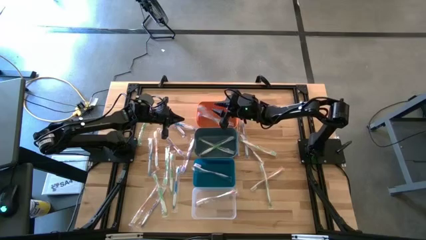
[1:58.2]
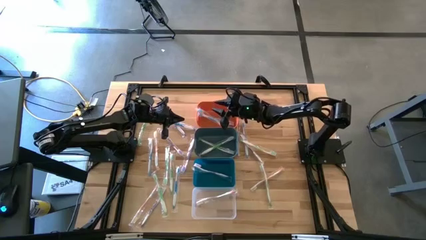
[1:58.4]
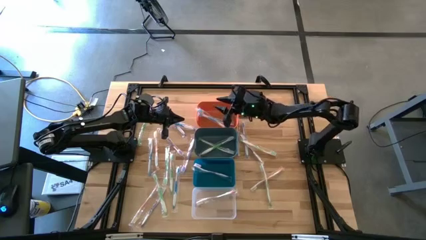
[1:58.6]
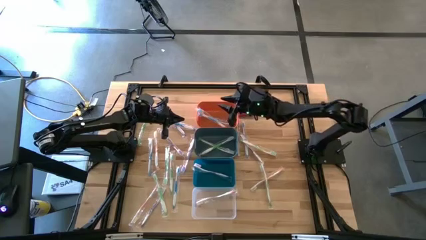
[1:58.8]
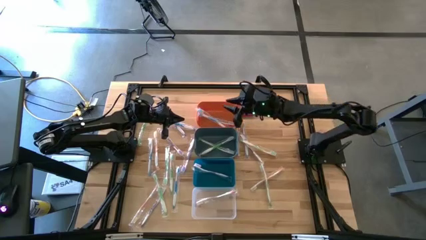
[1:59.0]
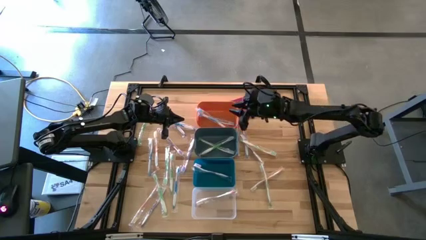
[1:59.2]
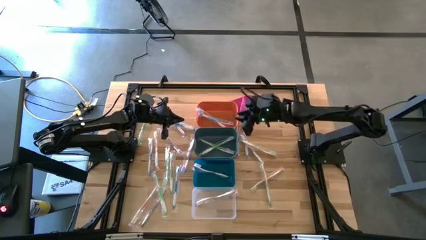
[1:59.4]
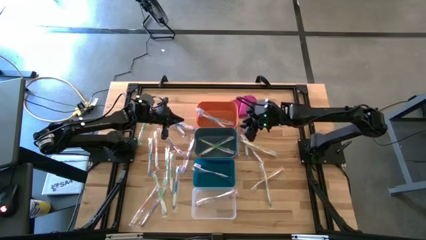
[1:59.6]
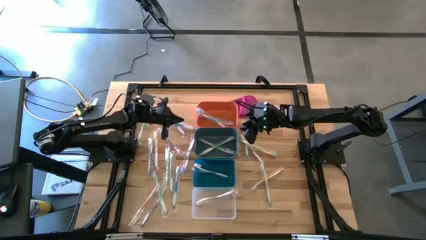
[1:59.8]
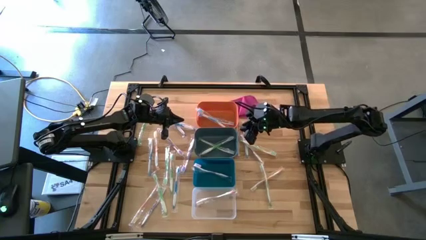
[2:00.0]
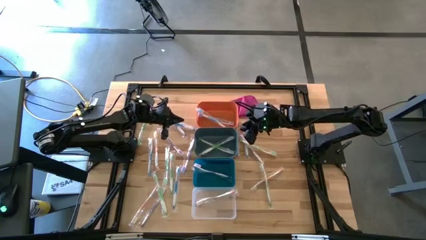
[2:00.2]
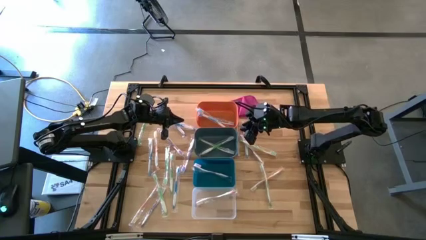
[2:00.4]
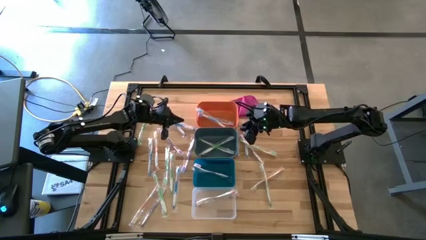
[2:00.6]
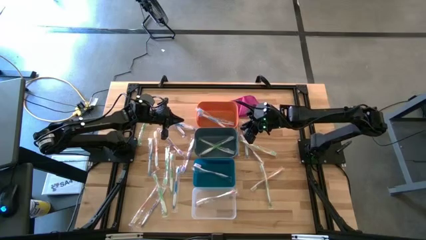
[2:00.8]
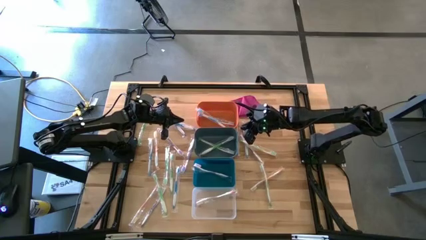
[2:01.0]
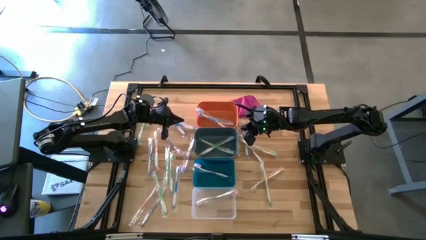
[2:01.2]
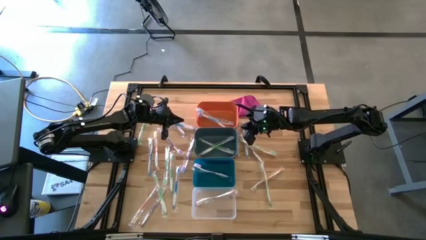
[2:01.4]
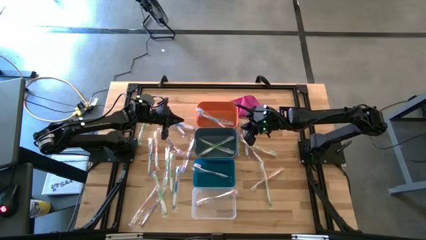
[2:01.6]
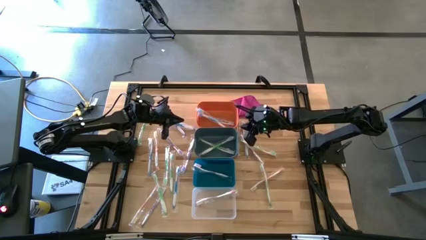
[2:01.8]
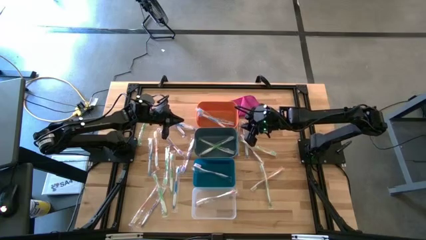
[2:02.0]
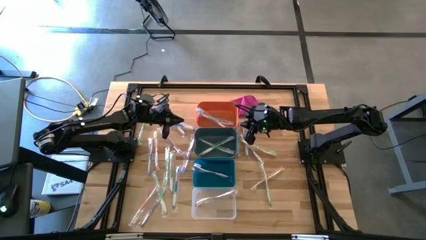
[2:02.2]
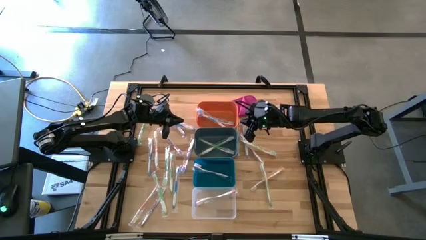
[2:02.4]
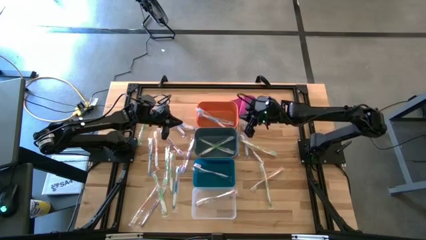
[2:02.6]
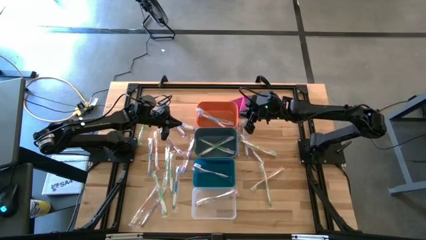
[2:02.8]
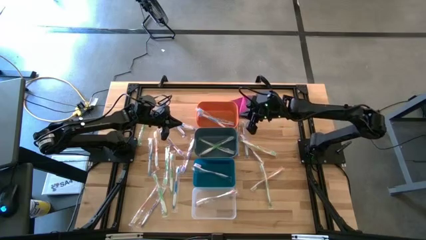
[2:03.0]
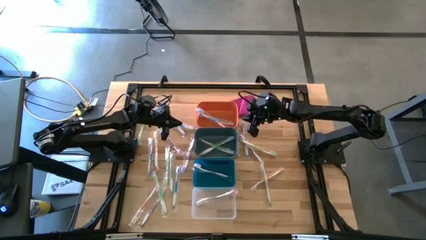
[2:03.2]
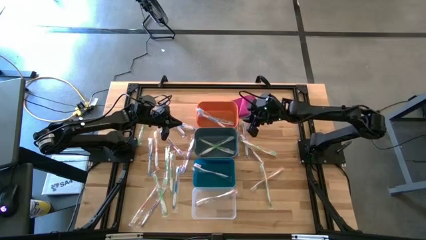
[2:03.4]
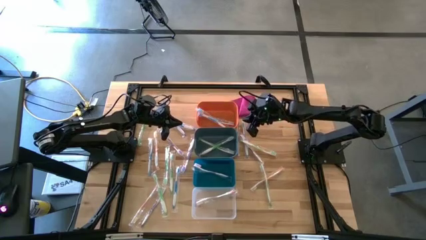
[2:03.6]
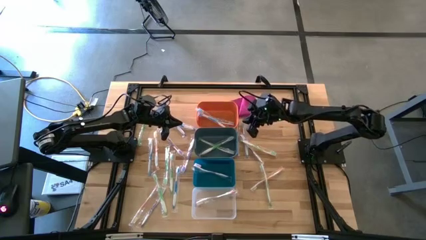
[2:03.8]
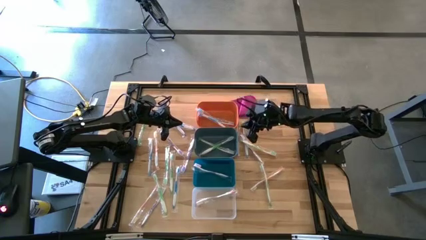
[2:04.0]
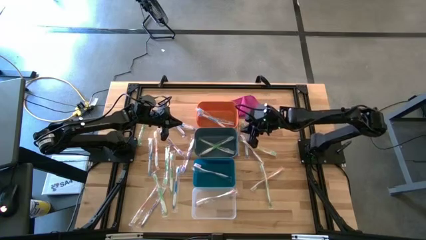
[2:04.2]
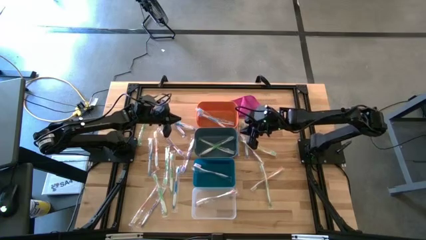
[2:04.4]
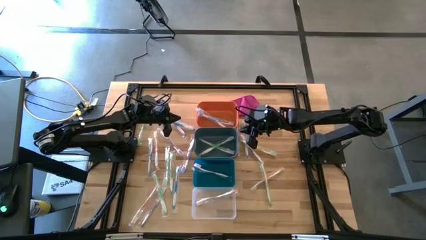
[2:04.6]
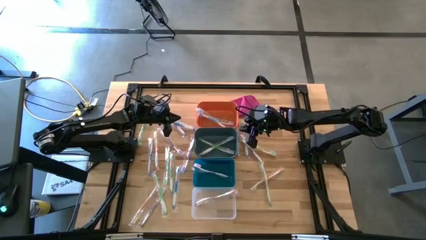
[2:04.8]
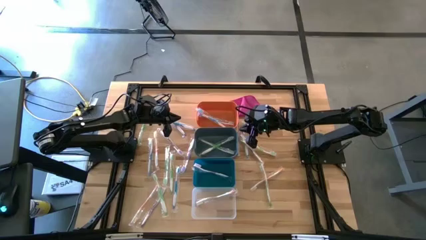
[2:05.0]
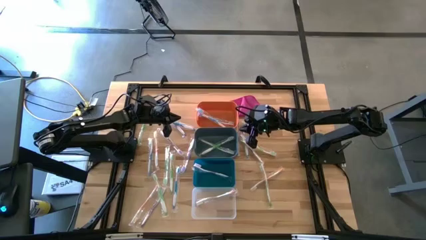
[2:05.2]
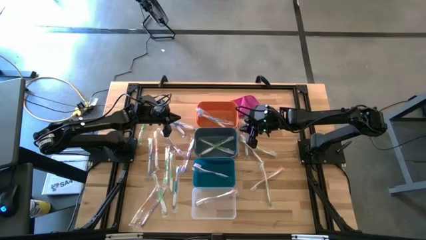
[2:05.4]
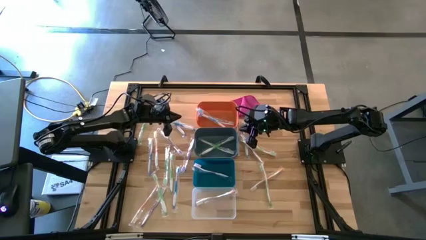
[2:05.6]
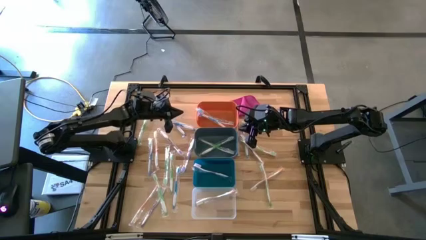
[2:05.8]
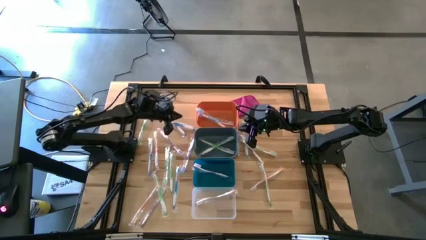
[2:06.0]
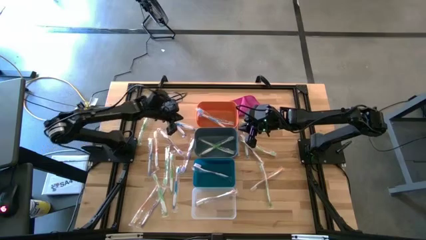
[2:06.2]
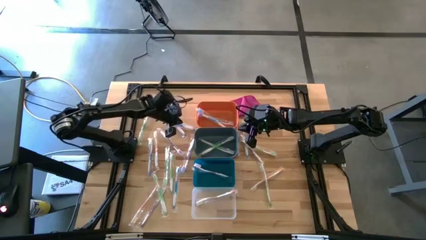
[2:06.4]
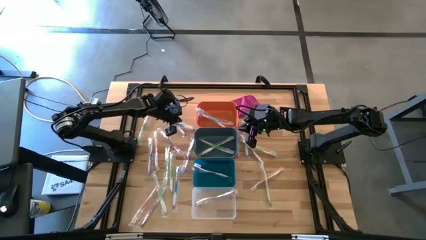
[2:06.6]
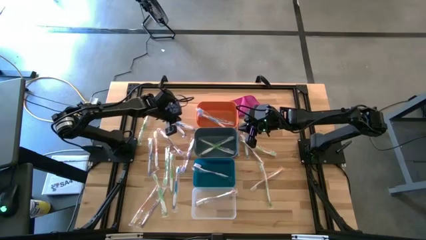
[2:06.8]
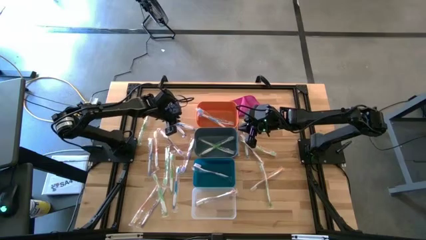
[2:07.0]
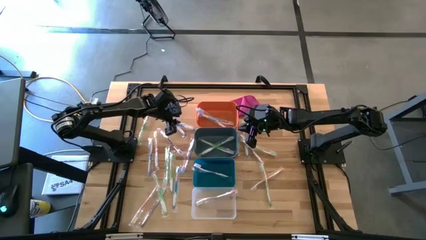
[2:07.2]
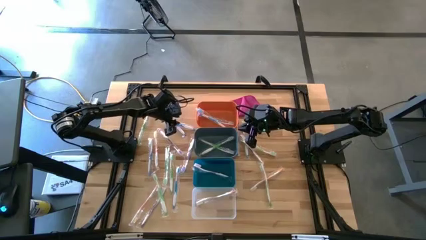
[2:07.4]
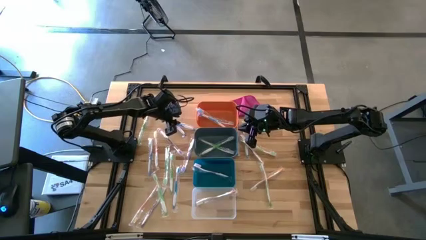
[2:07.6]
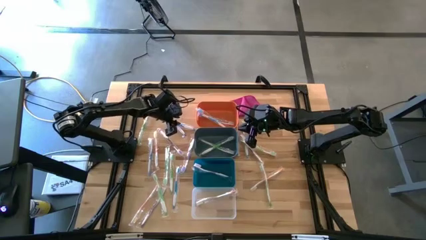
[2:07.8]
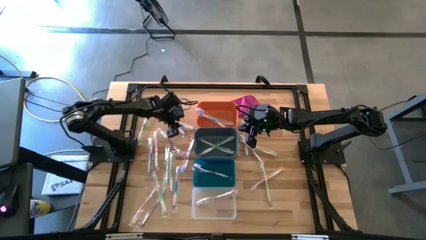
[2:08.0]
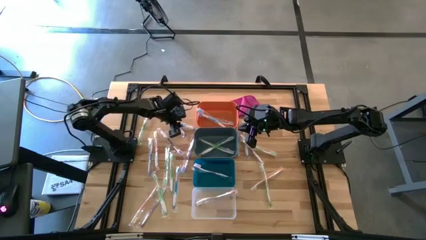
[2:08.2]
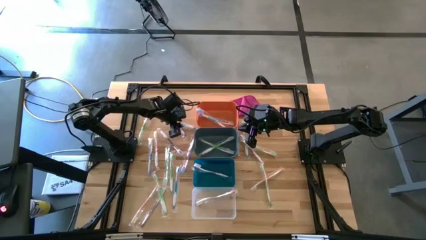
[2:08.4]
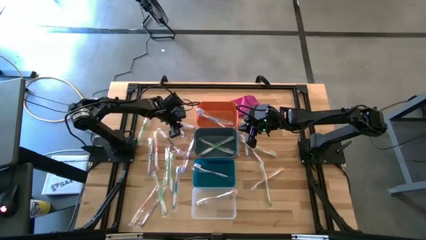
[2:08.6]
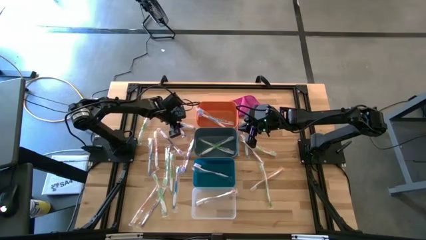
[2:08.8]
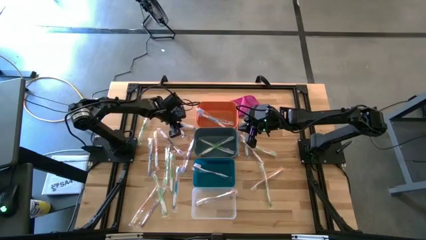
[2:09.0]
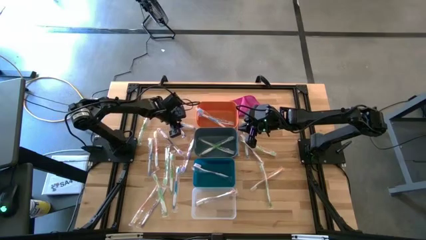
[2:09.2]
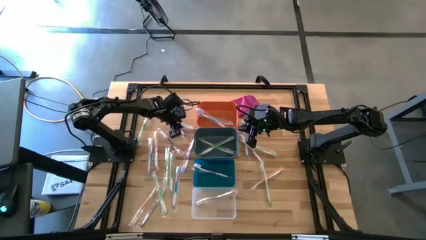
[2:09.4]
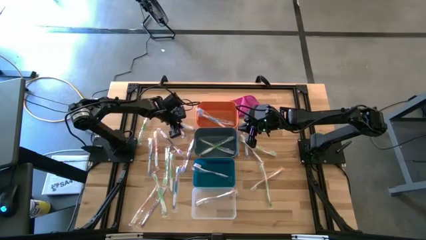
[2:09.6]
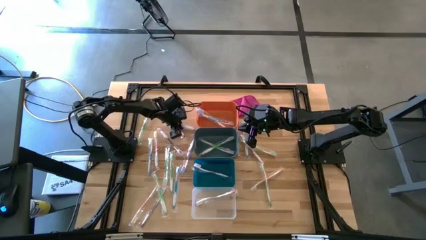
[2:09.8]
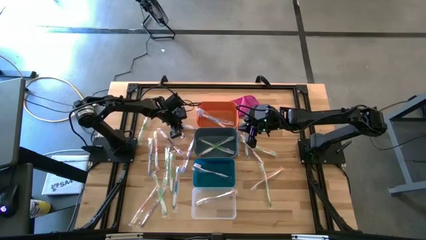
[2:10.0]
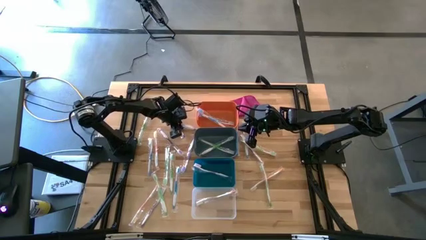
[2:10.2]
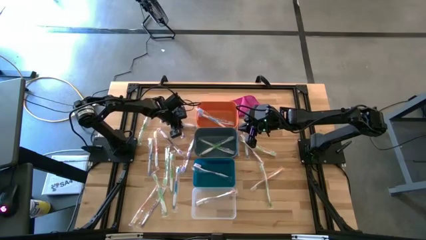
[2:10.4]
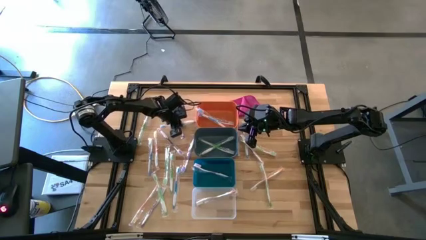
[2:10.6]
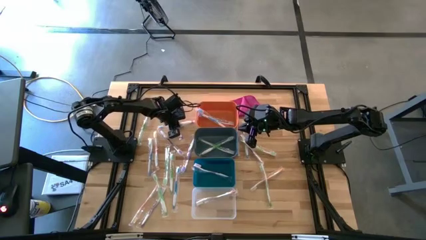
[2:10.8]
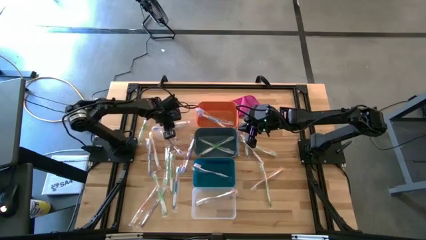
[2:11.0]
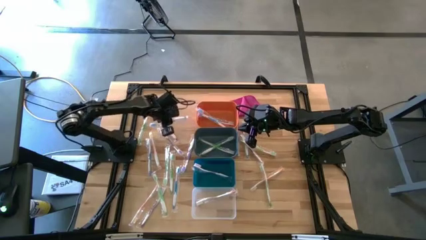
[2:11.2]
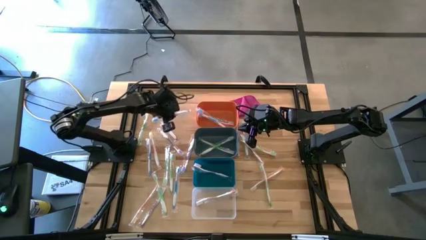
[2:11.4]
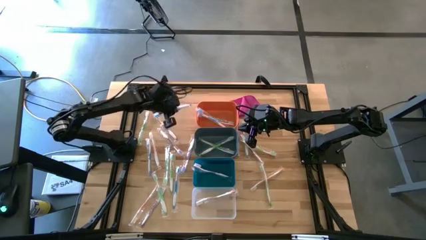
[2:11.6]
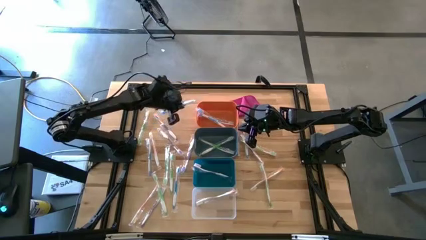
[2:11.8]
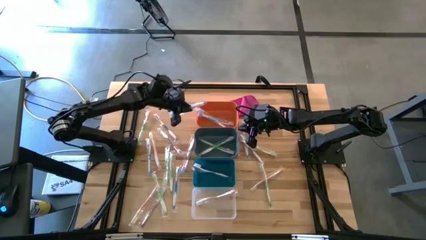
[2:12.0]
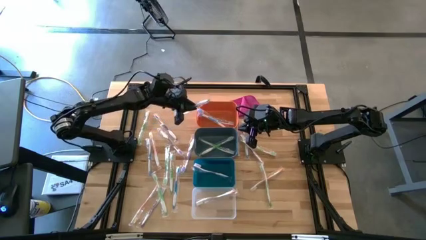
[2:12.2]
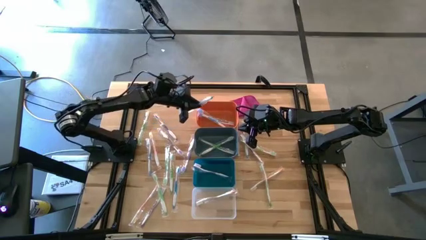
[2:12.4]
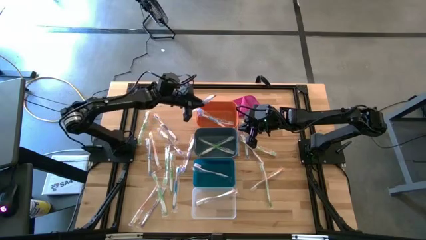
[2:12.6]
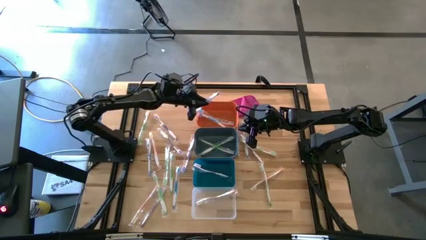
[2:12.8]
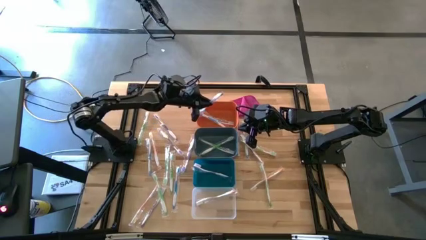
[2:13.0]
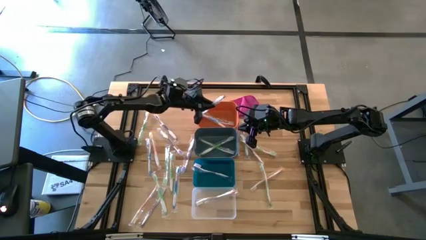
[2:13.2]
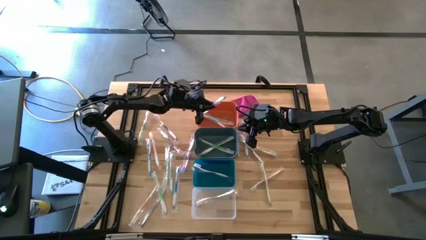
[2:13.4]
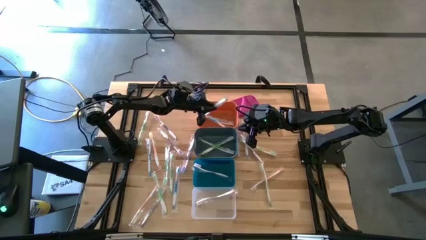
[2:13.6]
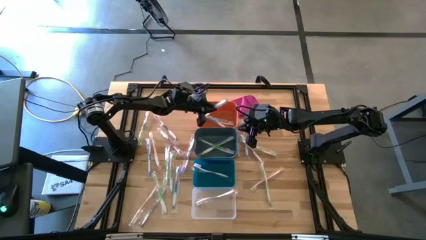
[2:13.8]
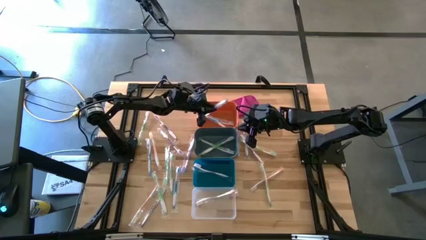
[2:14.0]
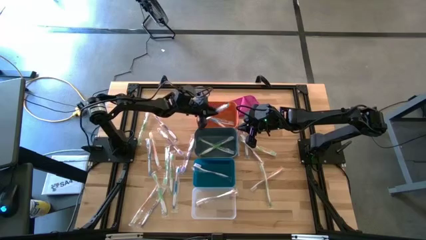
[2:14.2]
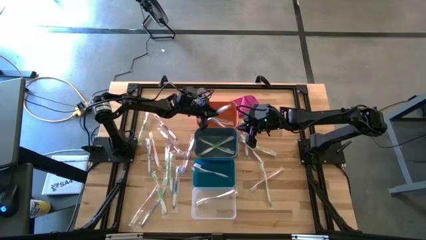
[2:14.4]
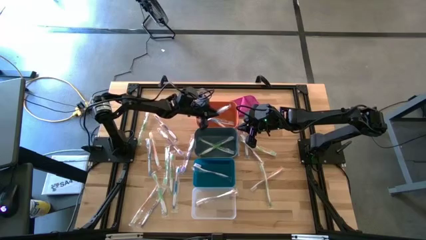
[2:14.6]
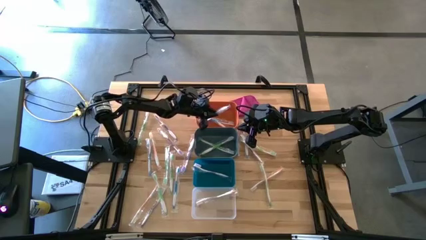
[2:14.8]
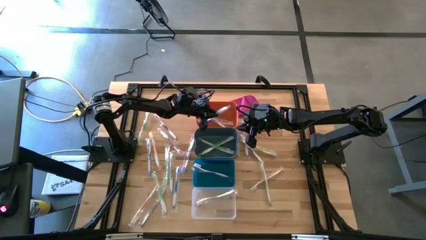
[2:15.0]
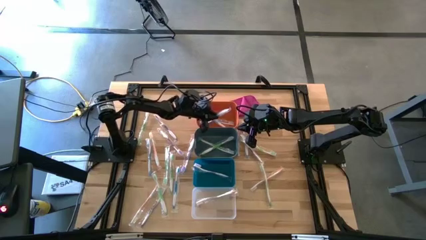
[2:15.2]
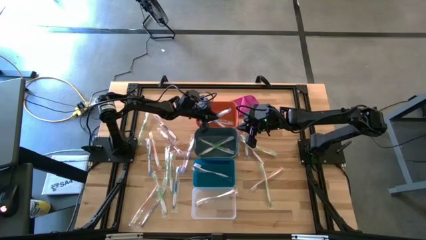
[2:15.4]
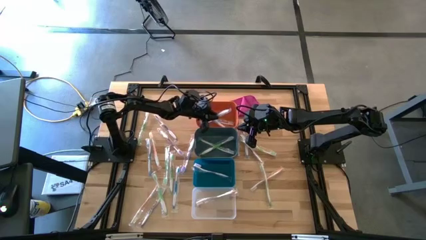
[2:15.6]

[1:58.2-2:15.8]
Task: Pick & Place Toothbrushes
Put the blue toothbrush into the orange bin
